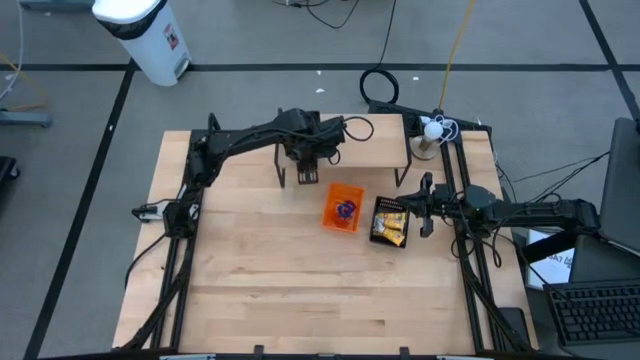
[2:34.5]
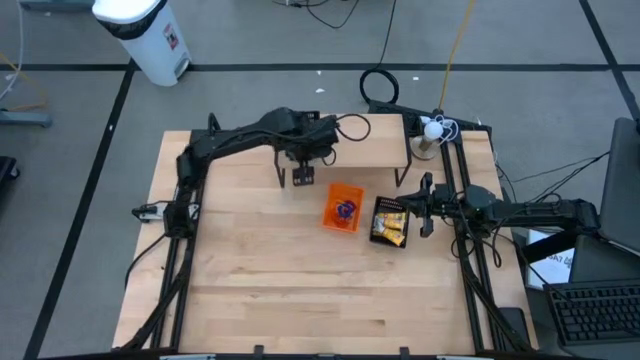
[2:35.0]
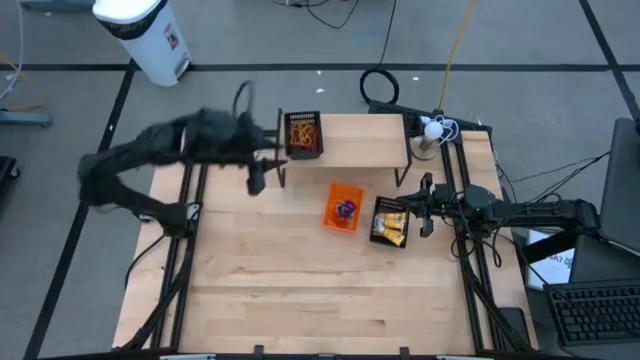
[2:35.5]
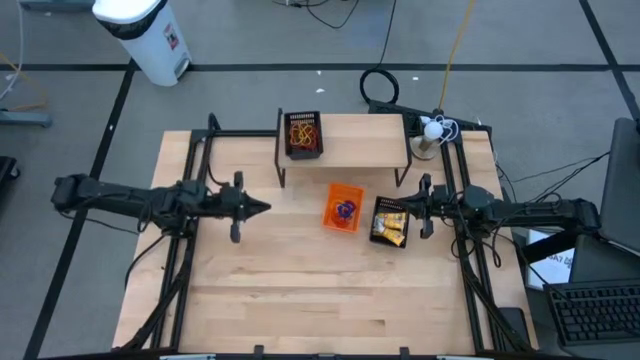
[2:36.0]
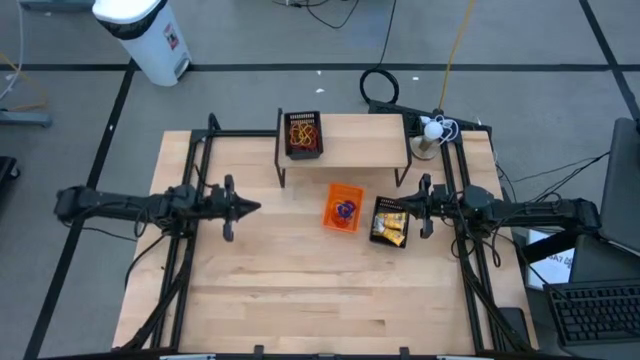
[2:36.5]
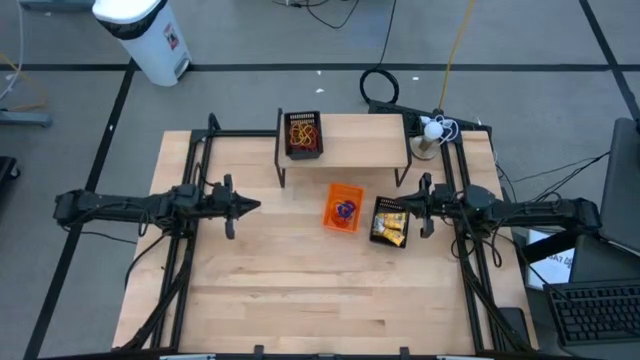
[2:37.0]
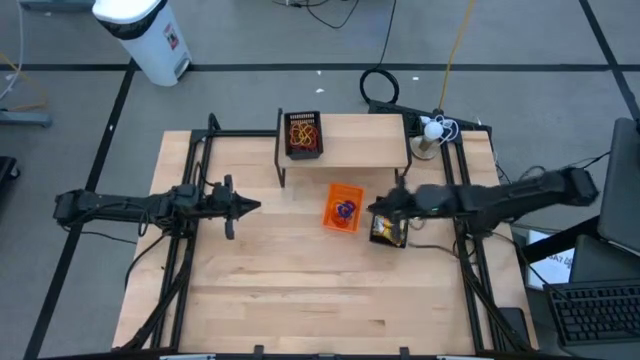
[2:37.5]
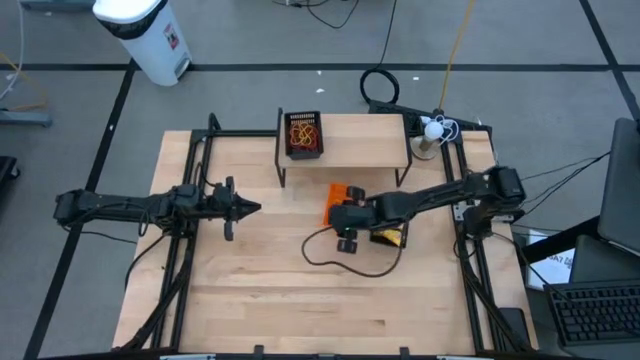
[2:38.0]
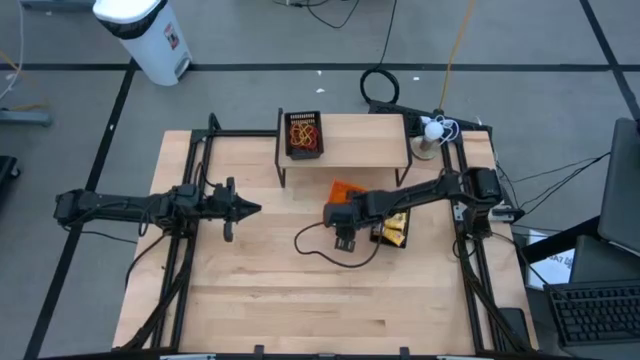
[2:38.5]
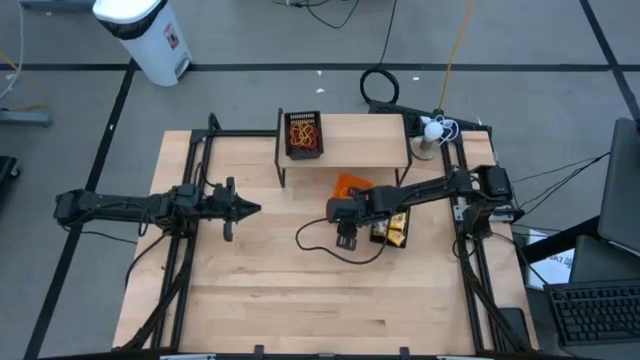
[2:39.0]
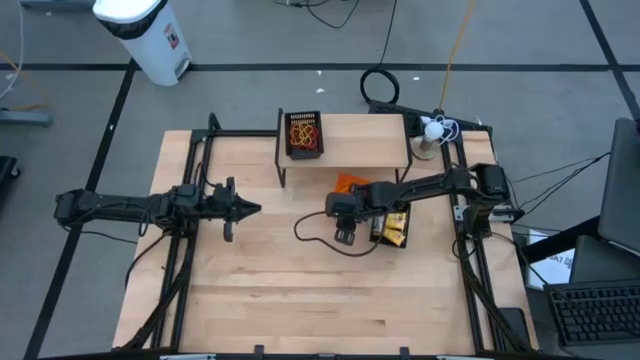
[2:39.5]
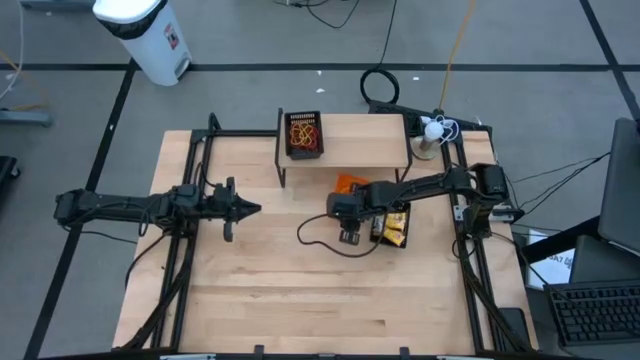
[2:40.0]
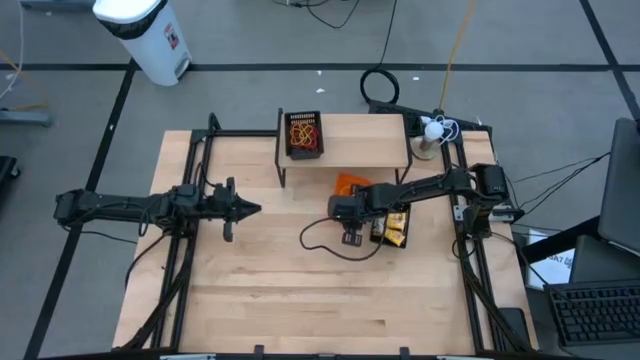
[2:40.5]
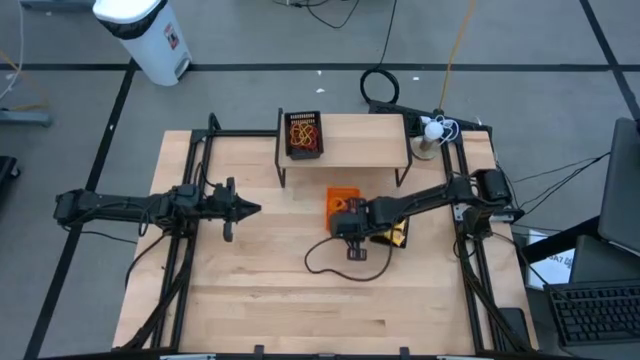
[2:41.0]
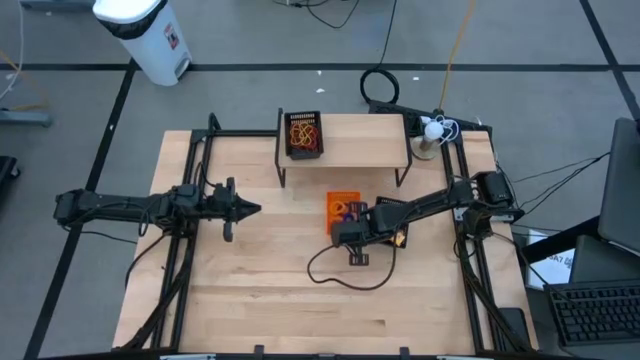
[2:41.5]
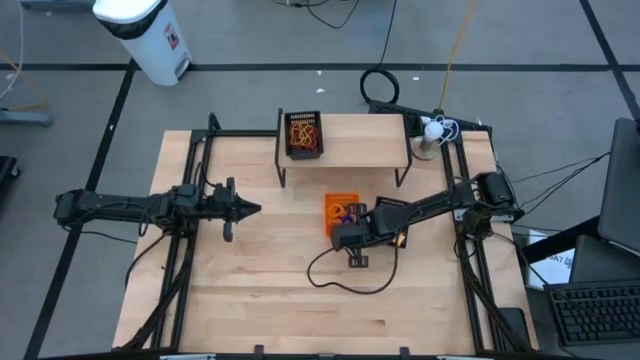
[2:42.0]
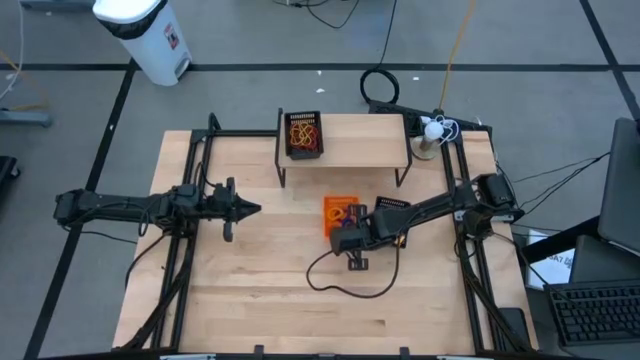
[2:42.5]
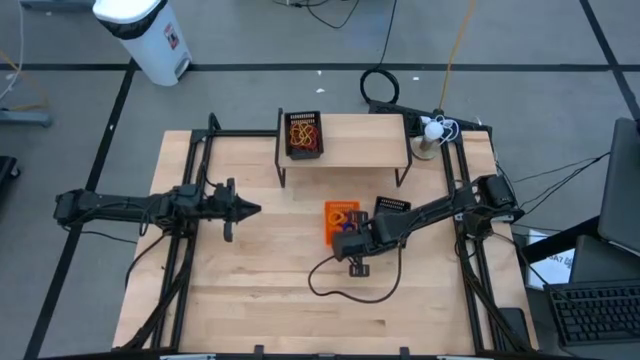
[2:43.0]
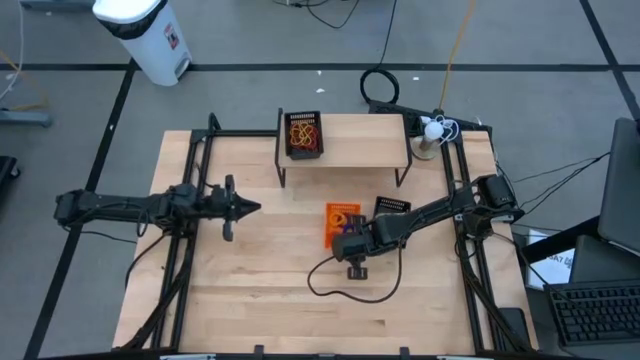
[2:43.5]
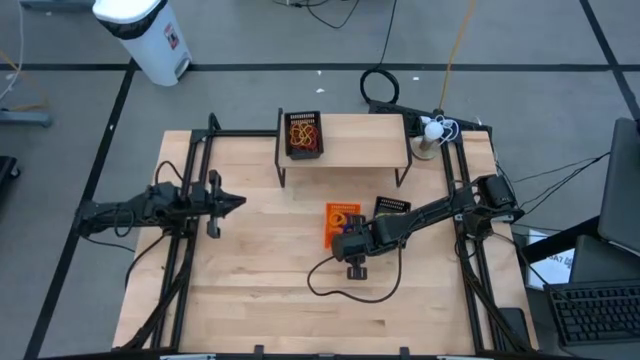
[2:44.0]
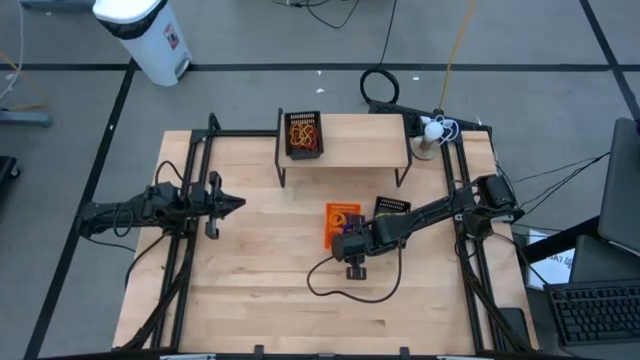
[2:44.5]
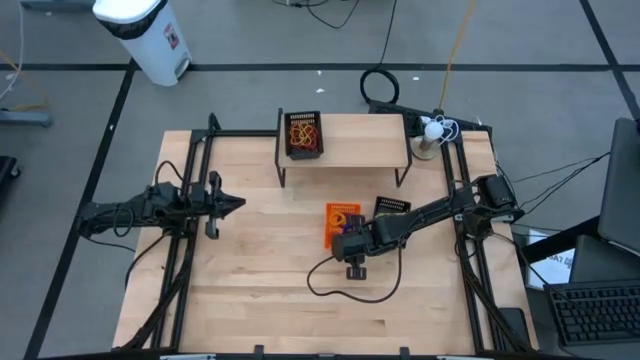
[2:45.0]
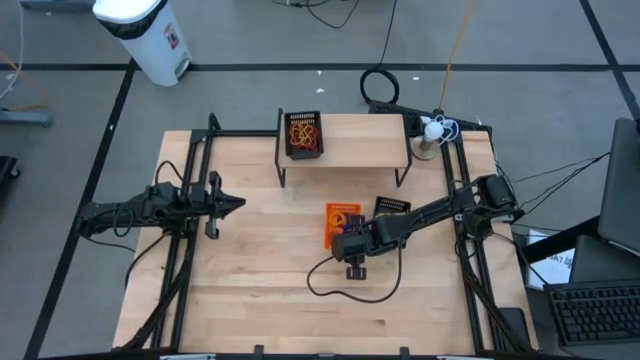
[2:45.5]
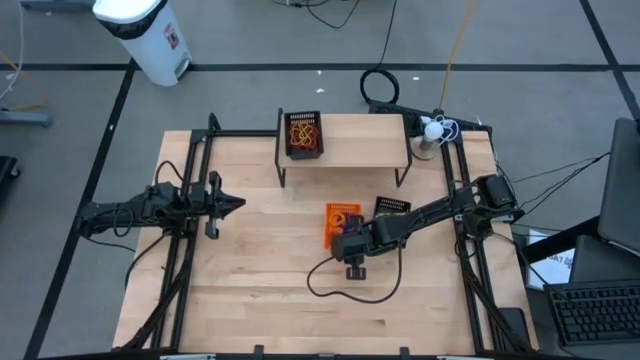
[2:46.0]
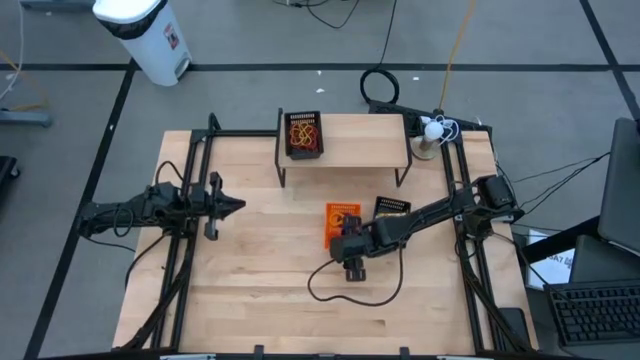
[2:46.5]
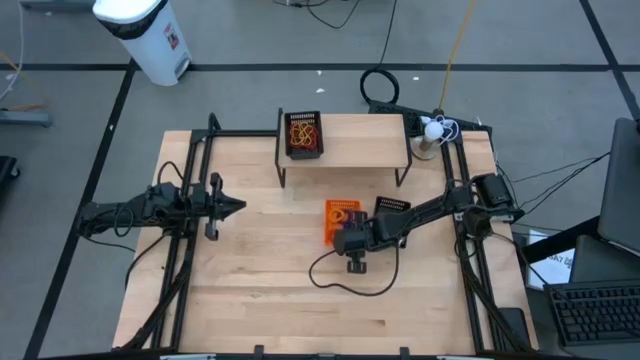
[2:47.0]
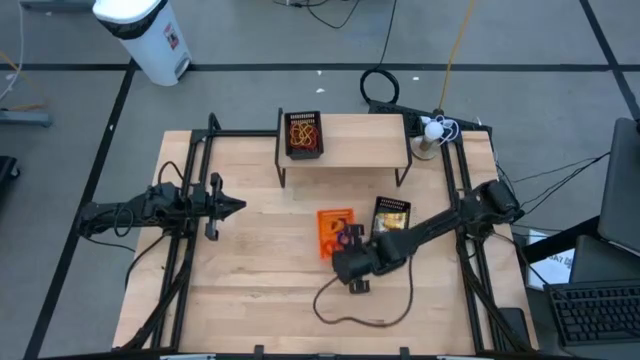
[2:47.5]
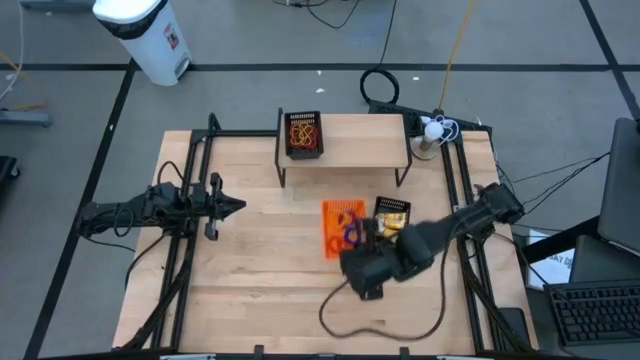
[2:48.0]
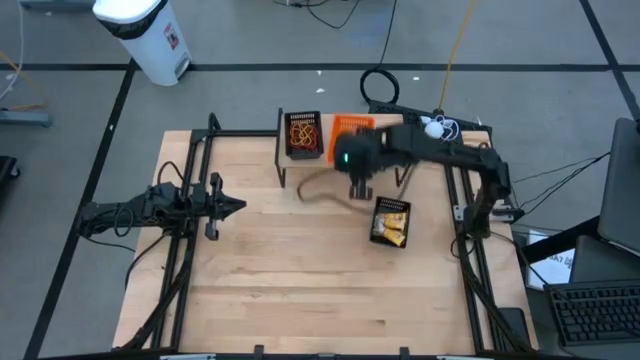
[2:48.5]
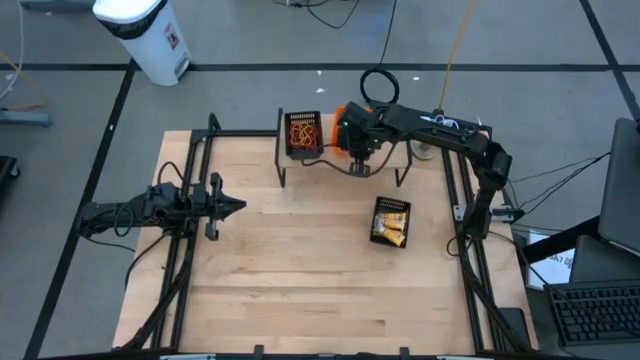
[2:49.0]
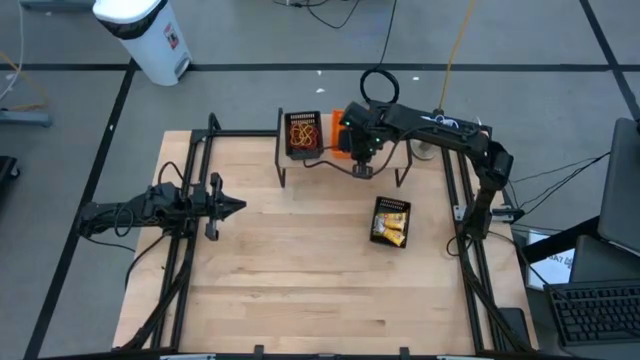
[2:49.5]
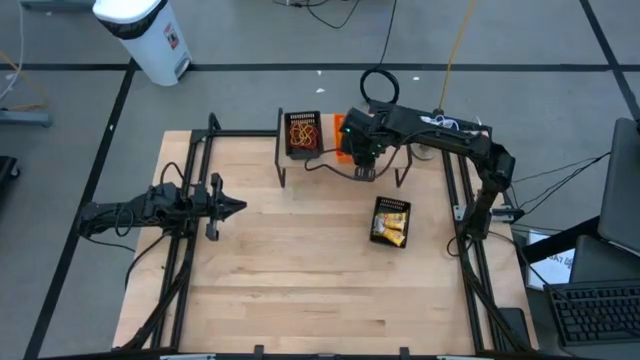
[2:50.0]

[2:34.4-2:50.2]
Task: Pick & Place Office Desk Supplies
Put the orange bin with spring keychains on the shelf

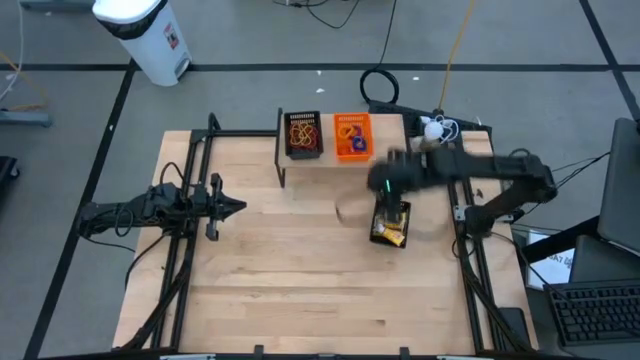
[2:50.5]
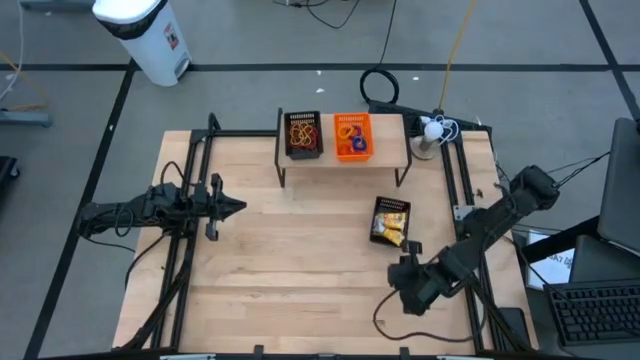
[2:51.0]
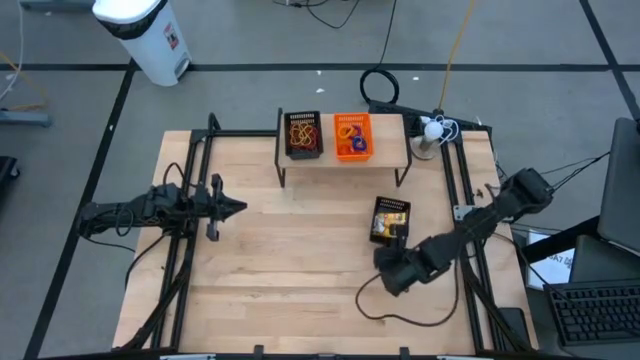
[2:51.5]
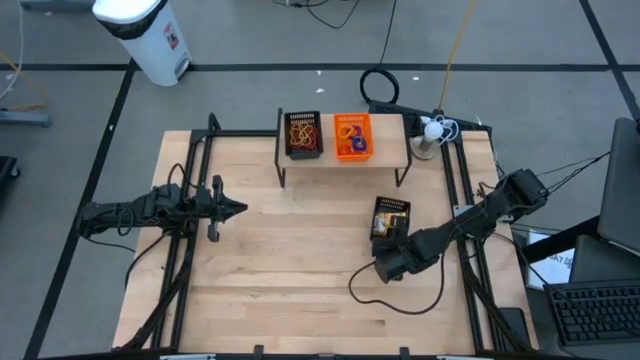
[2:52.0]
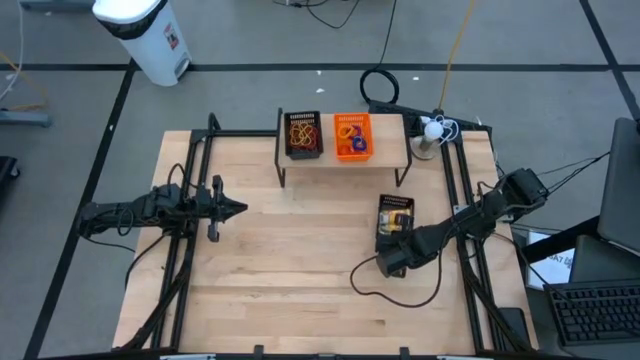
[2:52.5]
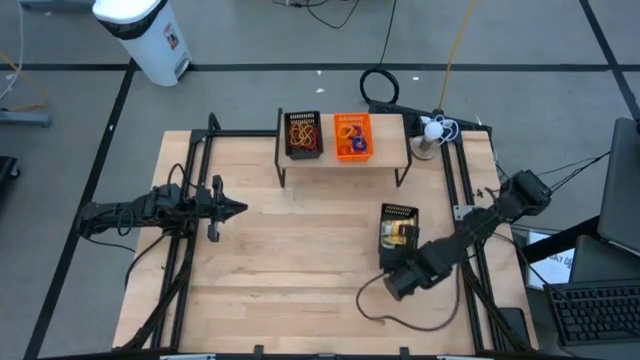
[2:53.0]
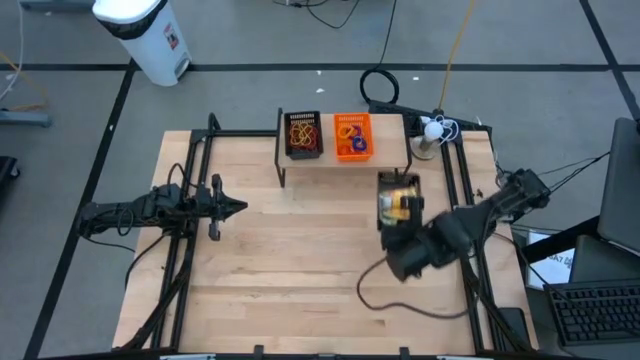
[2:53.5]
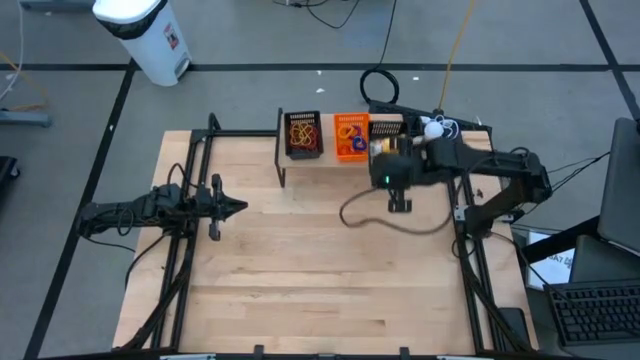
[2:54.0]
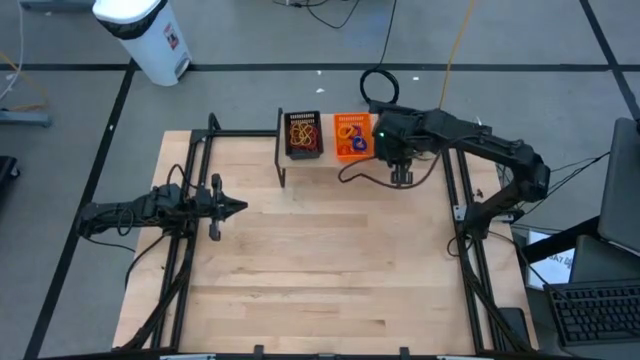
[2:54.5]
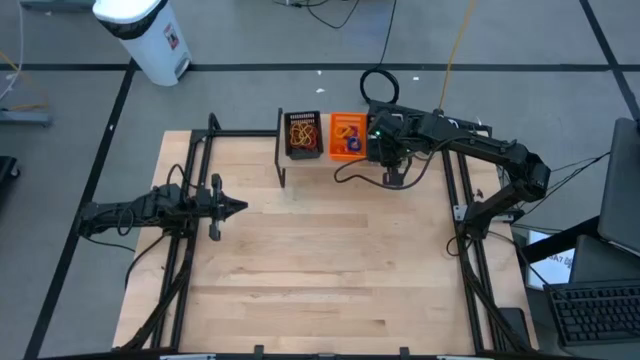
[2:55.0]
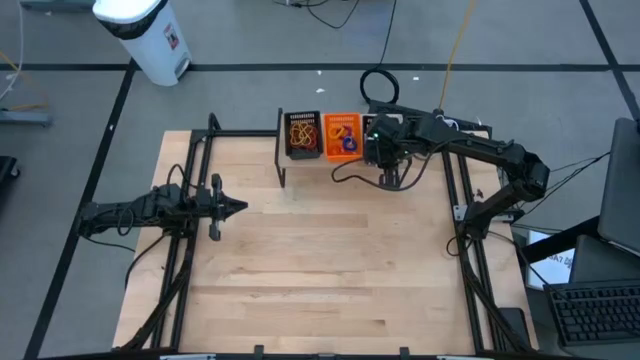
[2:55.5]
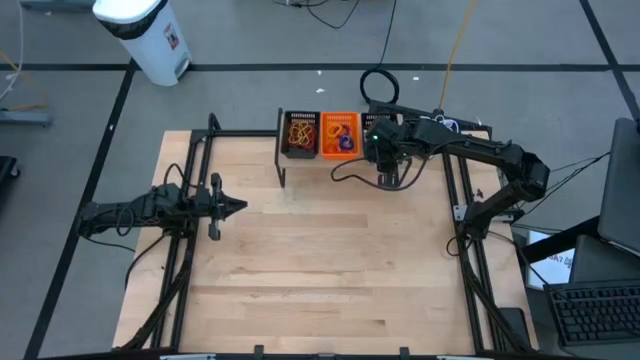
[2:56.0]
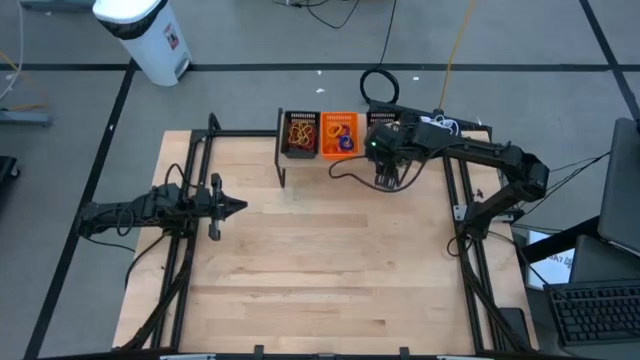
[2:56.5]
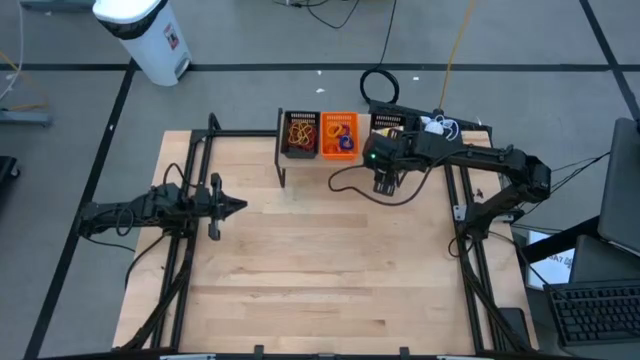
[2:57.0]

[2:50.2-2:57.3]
Put the black bin with crayon boxes on the shelf
